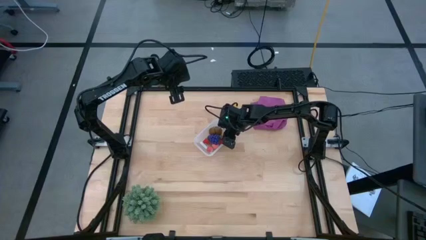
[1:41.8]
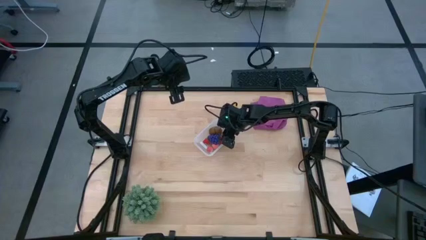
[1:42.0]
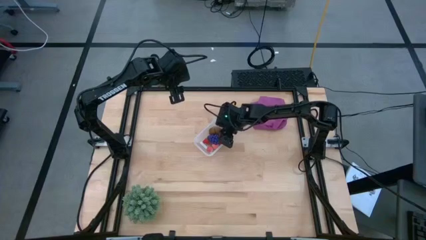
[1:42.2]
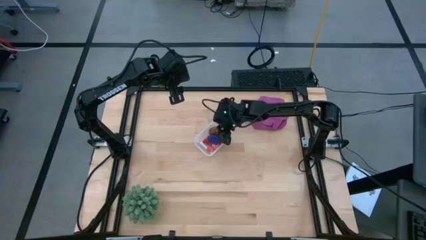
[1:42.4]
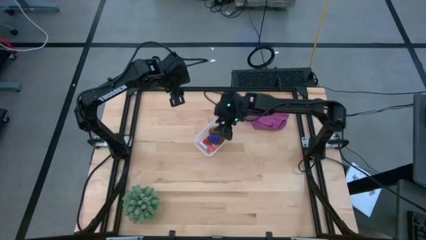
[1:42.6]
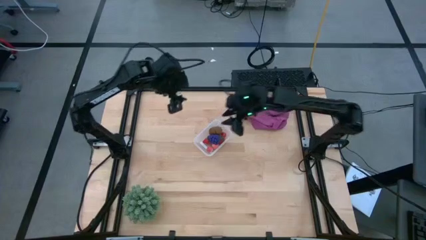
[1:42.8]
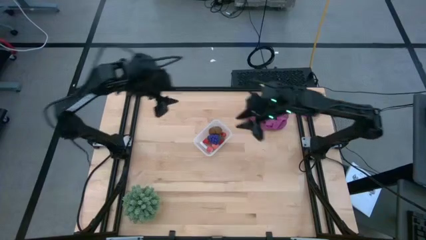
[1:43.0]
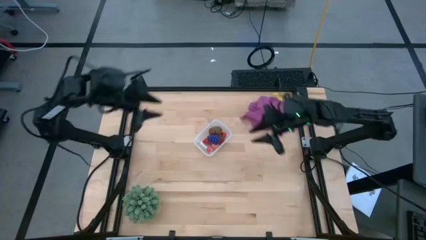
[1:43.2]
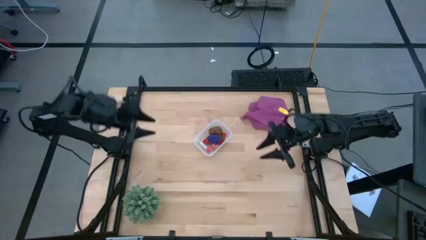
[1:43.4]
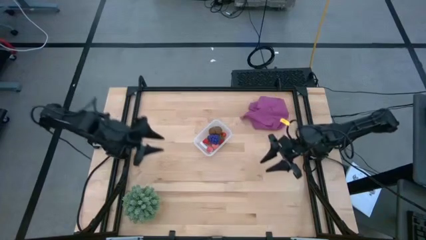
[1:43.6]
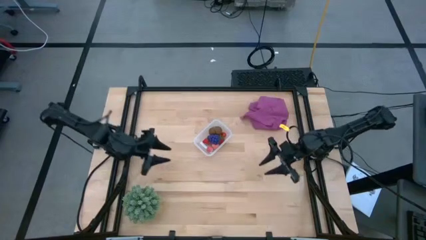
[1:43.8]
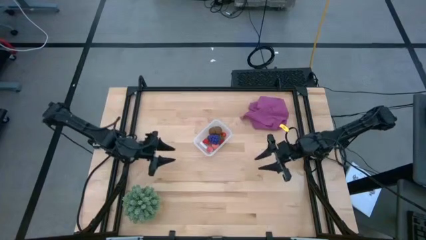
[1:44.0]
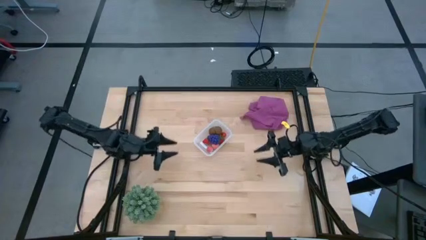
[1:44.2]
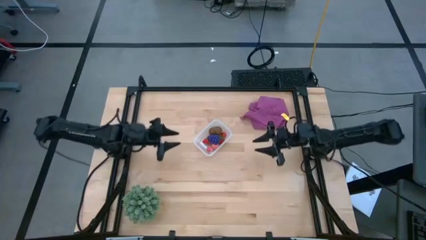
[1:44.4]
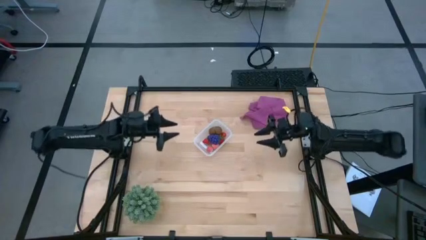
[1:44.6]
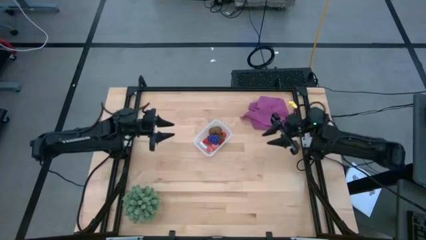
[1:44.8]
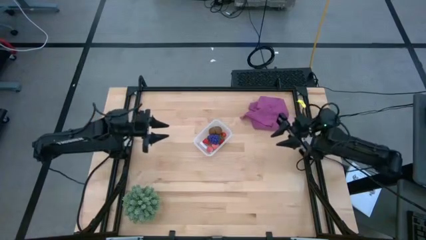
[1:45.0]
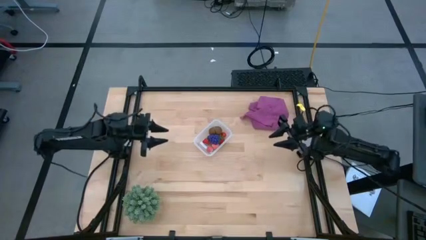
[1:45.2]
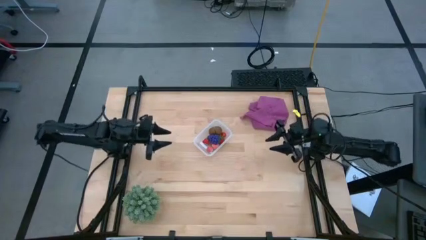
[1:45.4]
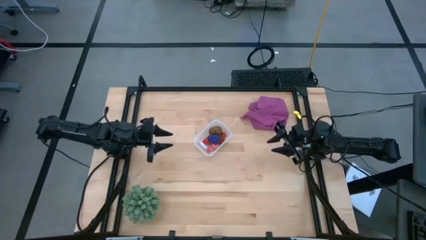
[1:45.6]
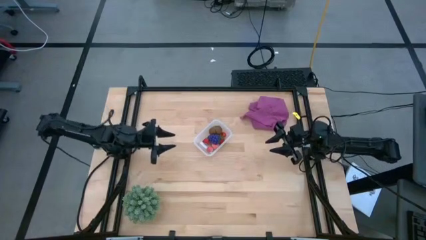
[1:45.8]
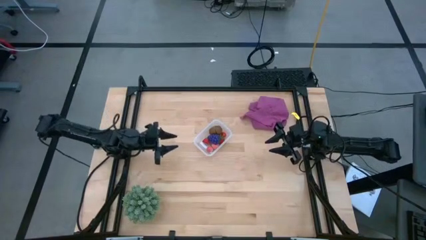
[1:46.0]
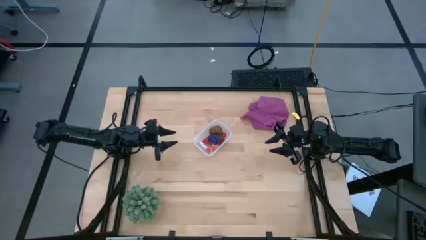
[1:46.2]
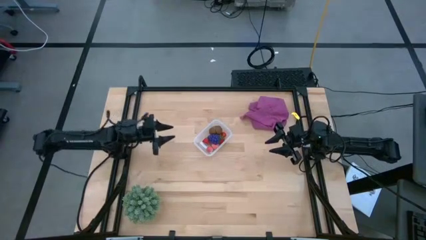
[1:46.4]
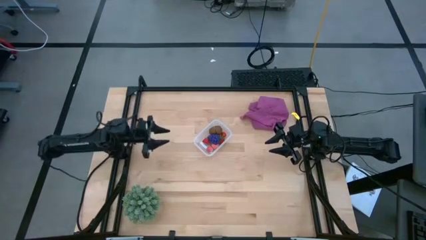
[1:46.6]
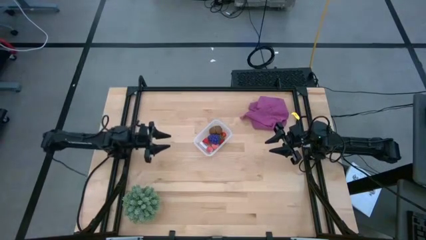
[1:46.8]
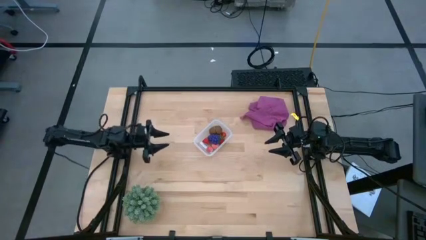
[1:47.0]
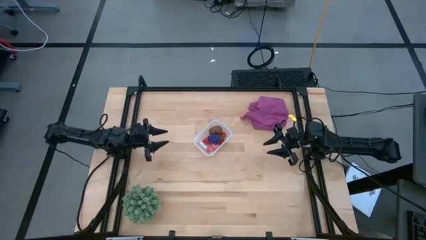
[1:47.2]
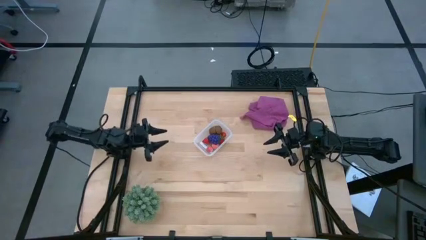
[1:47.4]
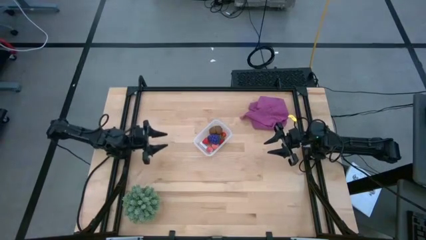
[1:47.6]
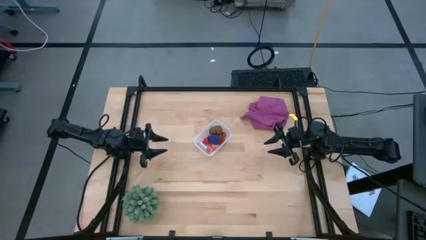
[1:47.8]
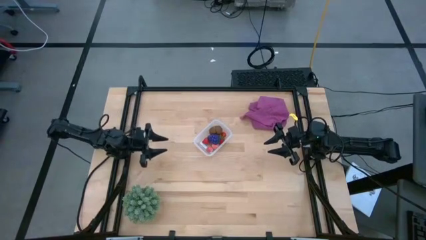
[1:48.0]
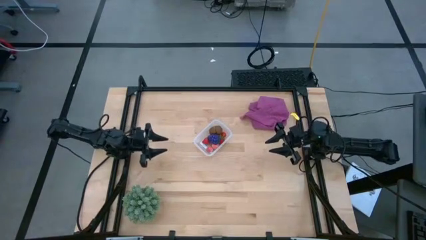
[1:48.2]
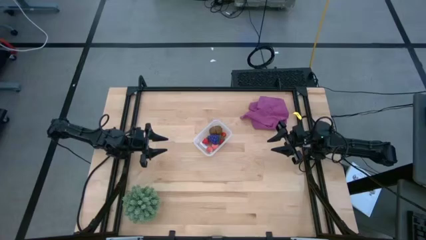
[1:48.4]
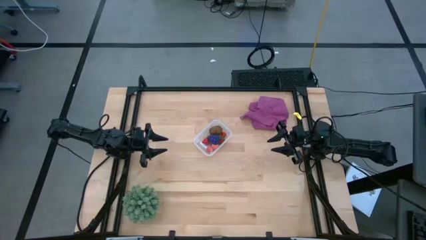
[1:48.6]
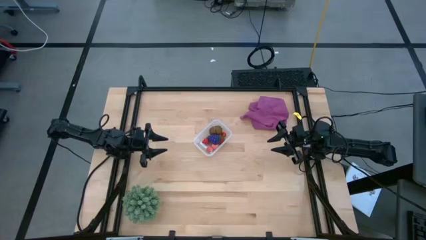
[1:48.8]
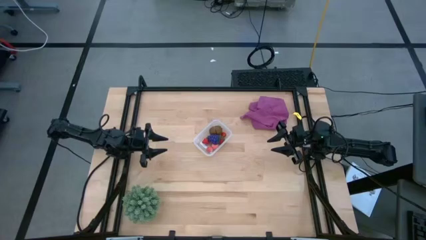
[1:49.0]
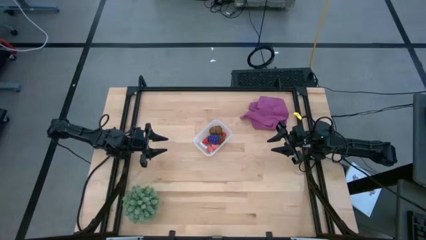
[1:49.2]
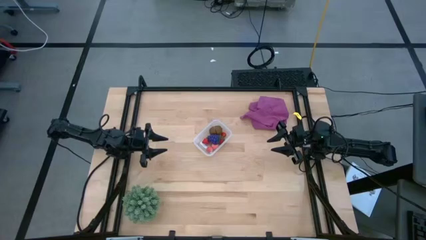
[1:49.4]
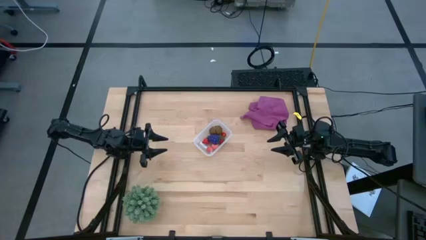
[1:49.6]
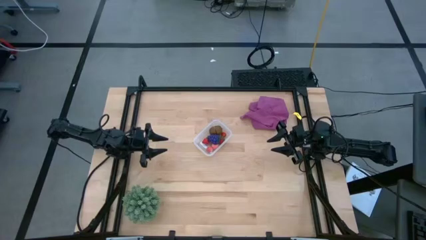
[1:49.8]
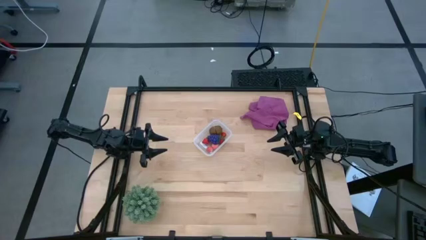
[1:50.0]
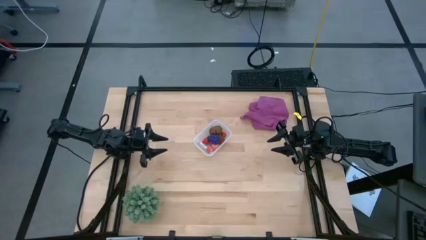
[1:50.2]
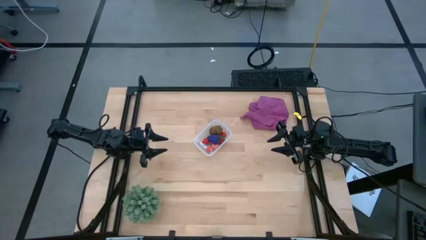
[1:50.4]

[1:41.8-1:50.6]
Task: Pick and placing Produce into tupperware
Return to home position

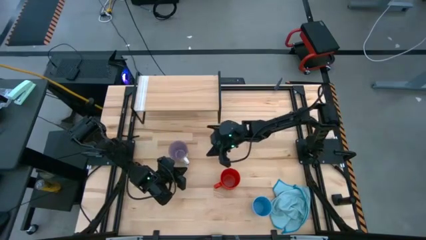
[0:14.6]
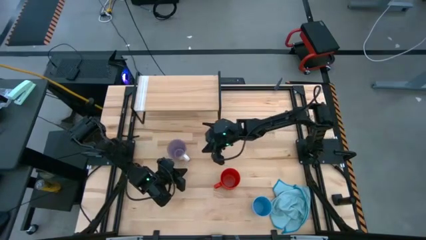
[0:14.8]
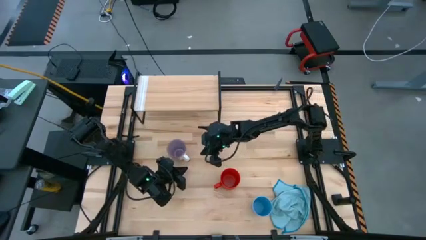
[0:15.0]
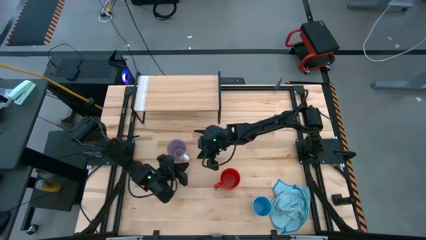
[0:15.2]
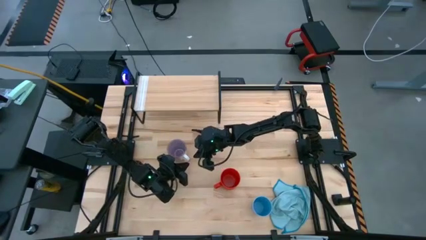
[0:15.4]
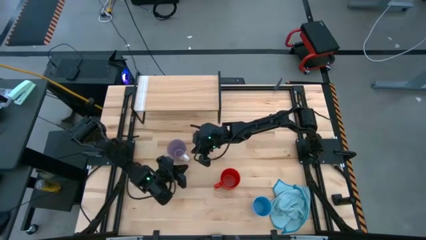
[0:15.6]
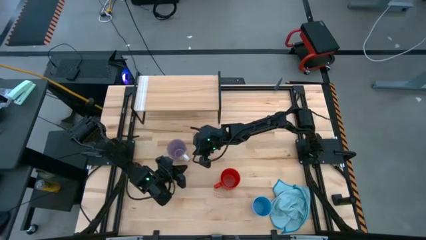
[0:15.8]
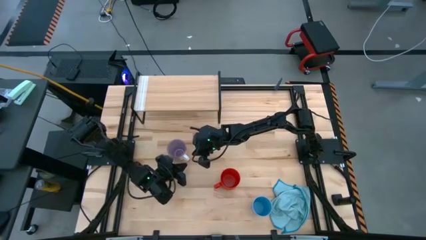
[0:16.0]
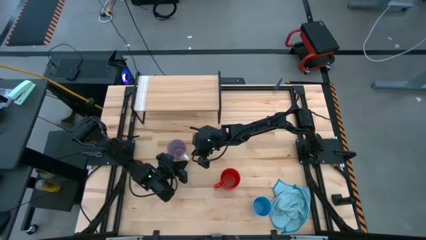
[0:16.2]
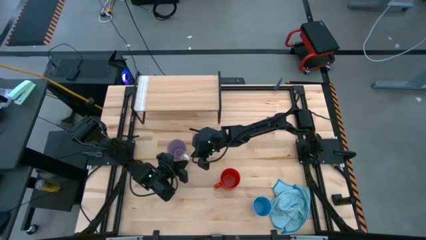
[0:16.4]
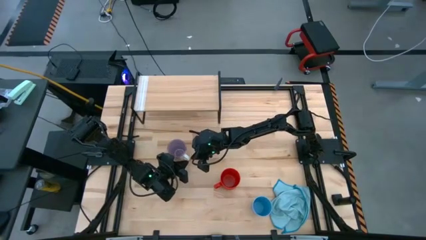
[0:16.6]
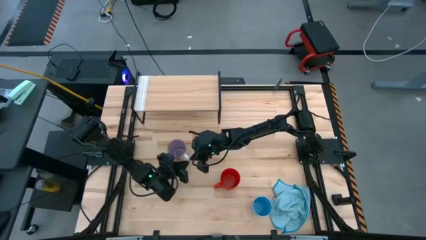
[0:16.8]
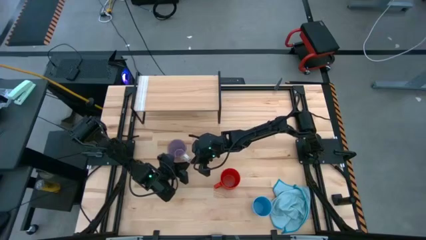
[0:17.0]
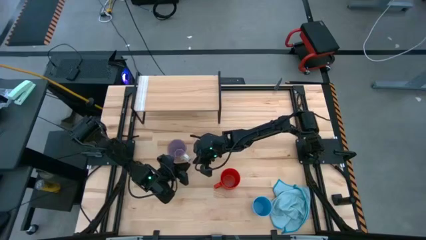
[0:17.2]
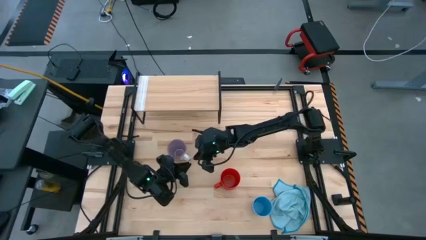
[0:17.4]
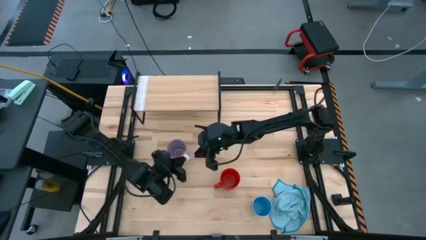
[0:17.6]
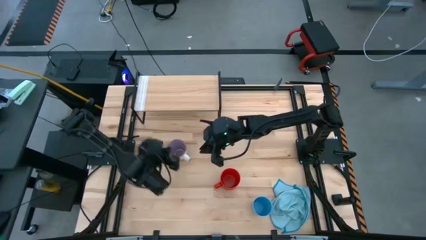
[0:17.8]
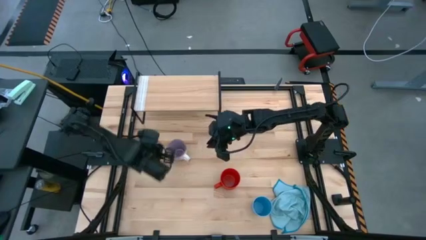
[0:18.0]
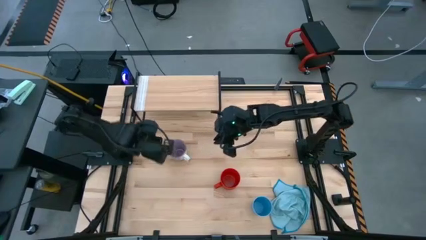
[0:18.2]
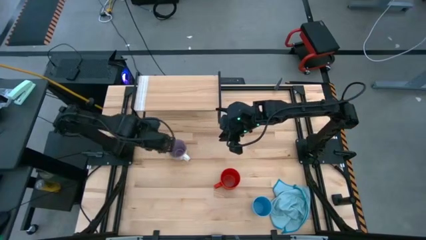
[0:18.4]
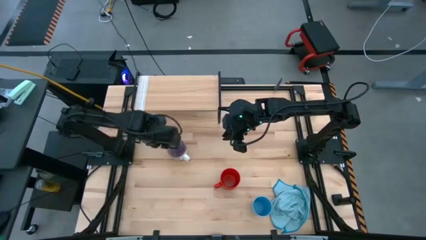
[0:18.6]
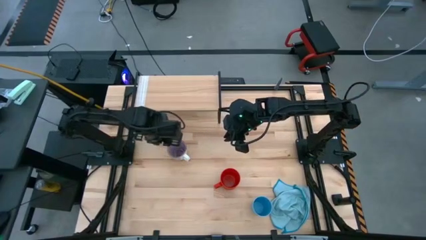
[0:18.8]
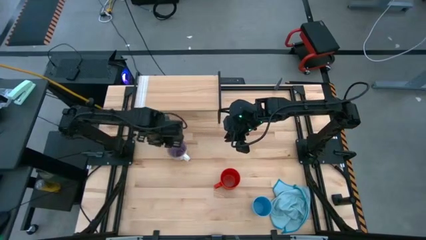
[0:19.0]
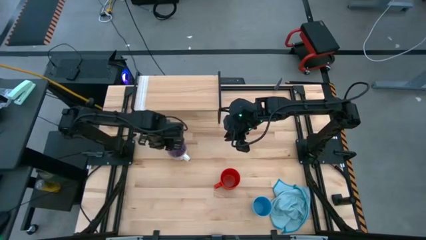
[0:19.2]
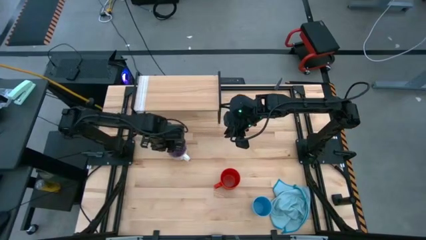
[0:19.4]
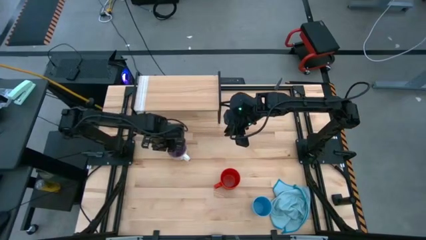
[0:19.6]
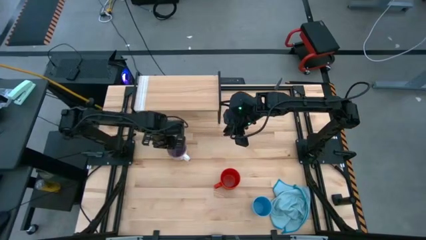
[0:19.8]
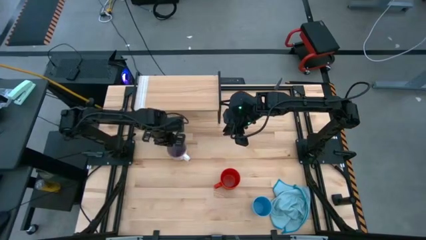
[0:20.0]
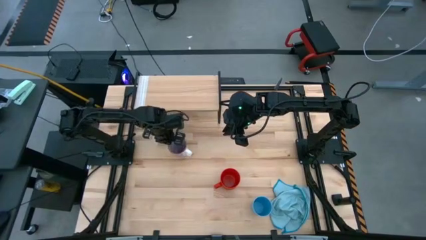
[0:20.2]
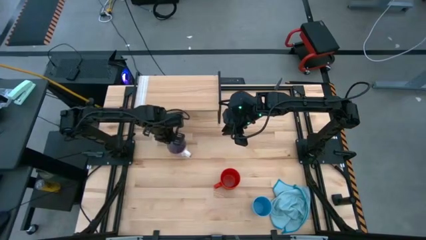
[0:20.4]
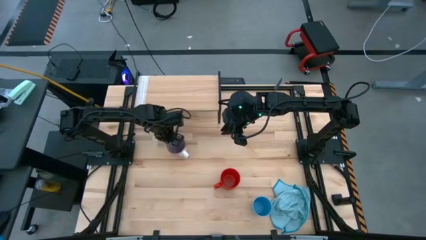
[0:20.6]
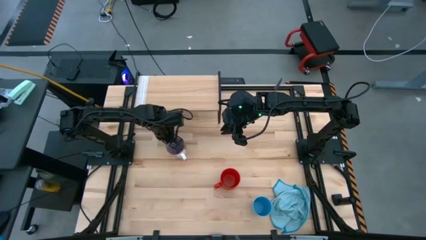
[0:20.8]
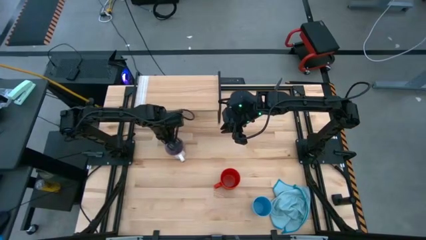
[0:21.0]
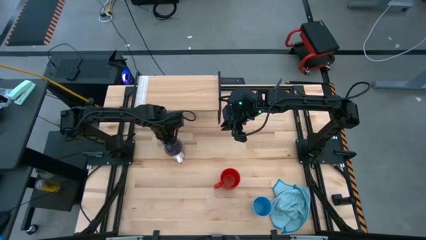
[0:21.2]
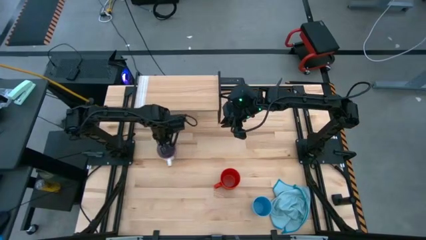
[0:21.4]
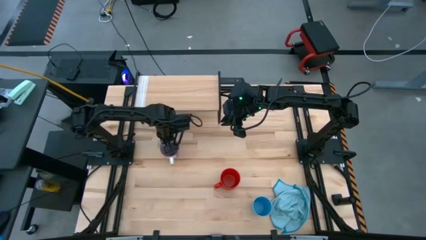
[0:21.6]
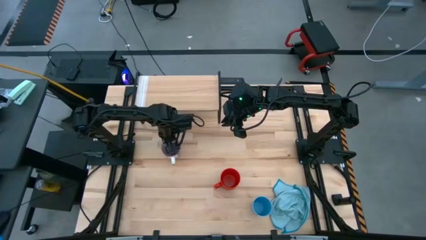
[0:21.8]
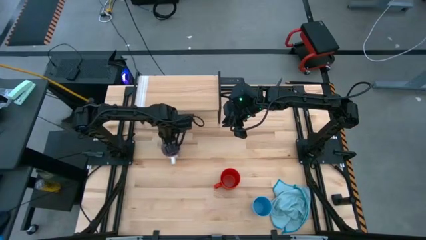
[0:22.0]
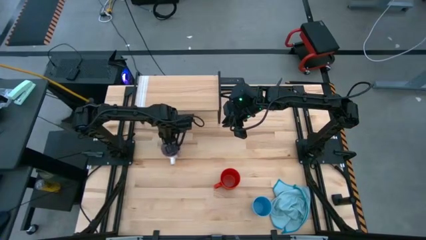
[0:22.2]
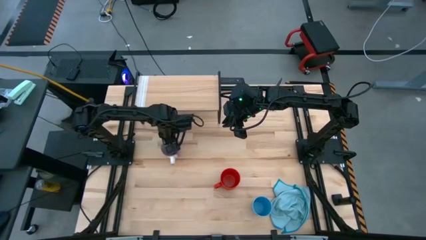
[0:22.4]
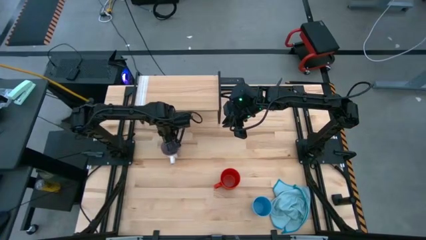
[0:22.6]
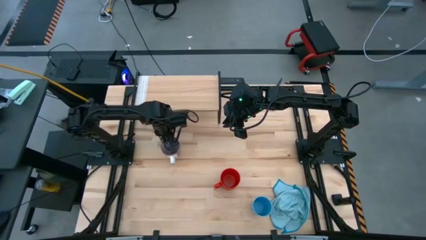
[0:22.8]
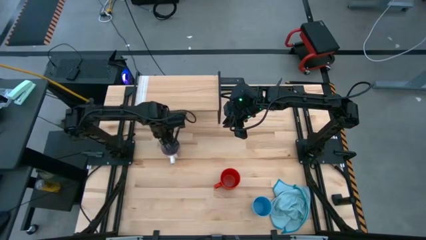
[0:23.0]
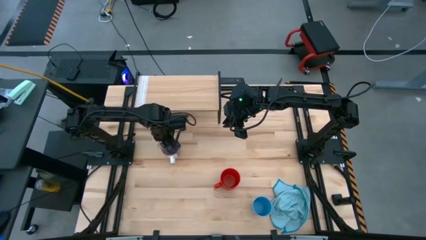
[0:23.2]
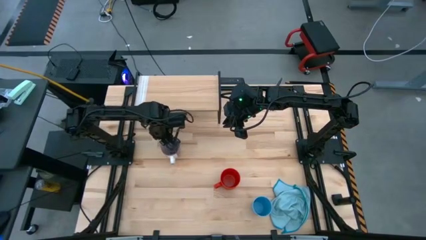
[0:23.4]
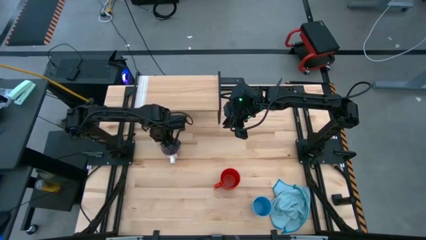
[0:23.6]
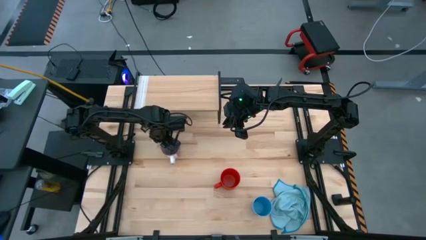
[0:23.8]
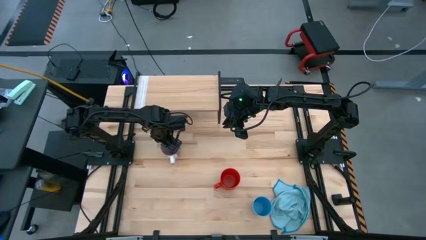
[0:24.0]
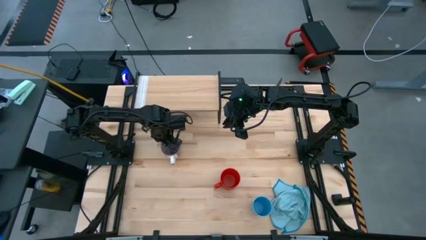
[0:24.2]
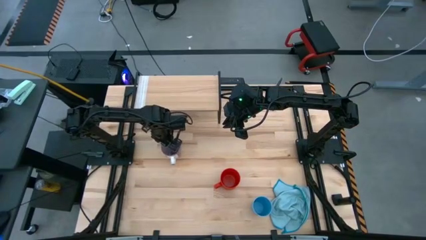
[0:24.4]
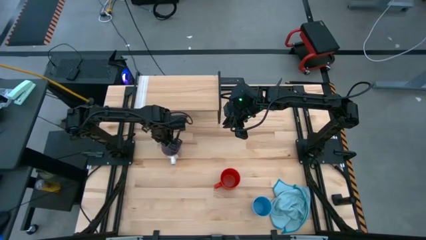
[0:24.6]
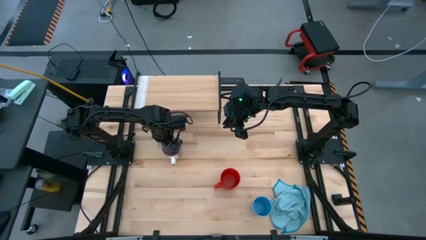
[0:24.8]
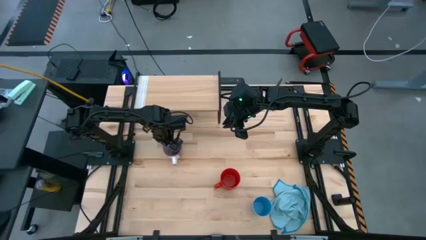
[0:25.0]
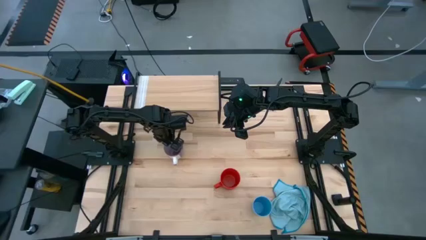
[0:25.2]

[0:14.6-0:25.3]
Task: Stack small to large cups/mugs on shelf
Put the purple mug on the shelf
